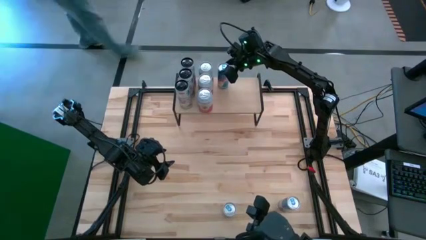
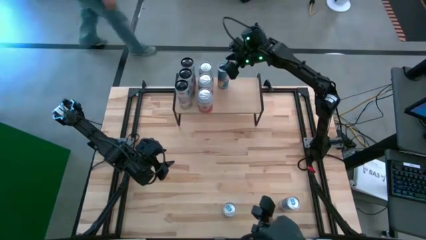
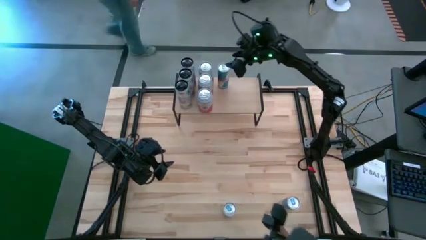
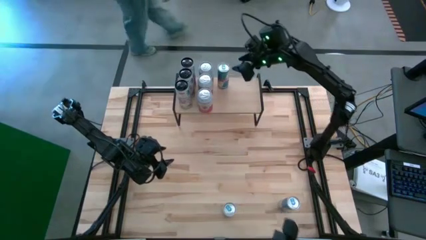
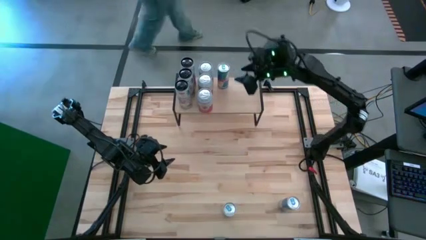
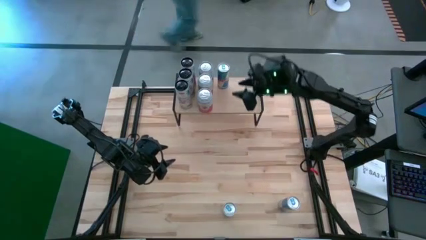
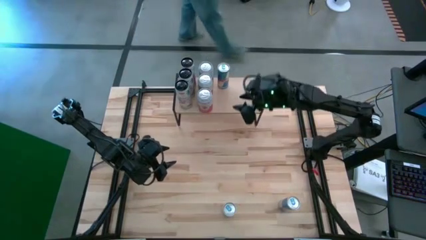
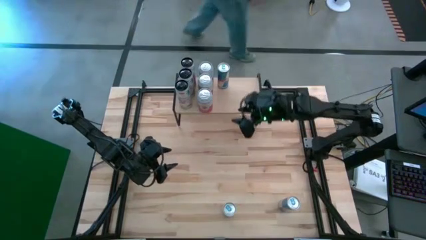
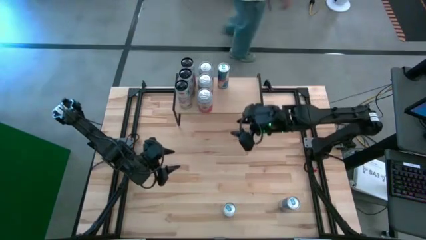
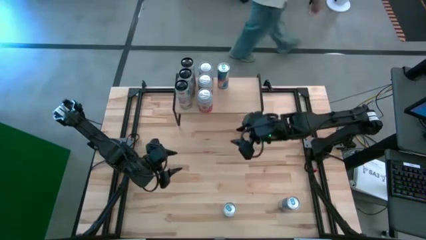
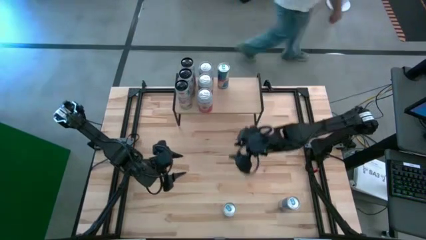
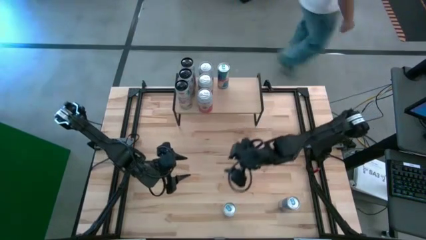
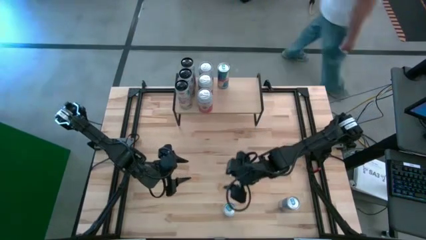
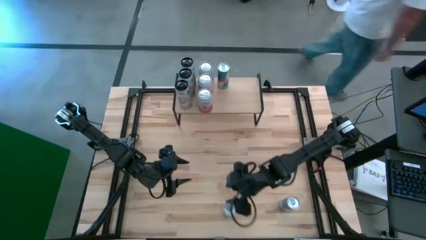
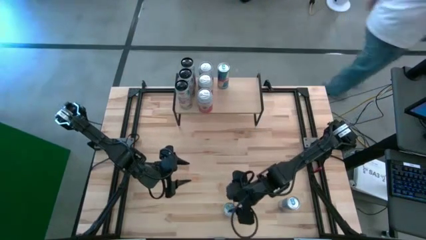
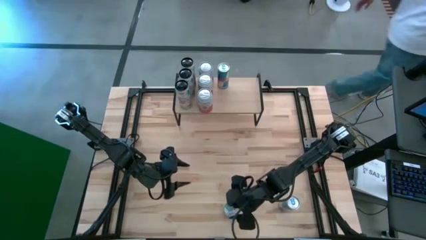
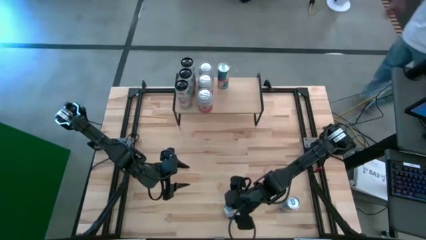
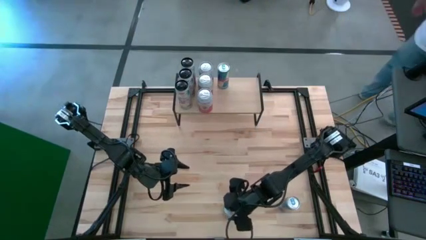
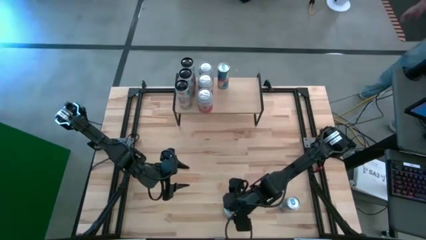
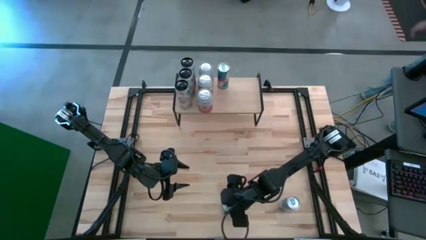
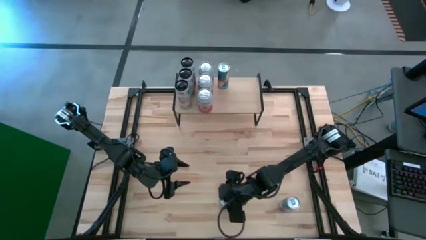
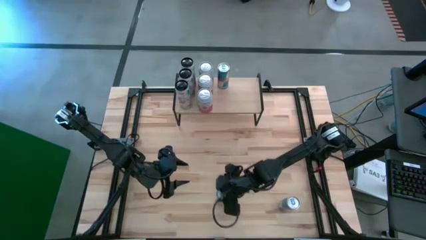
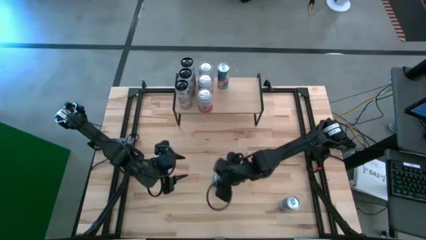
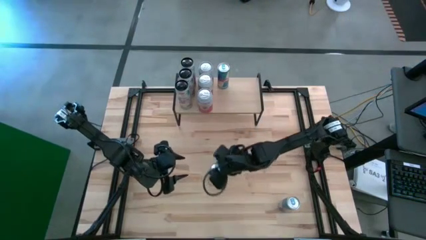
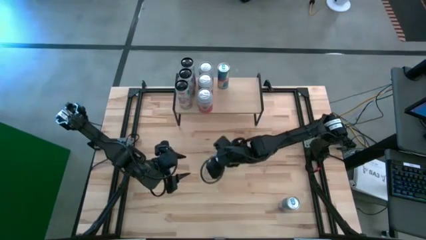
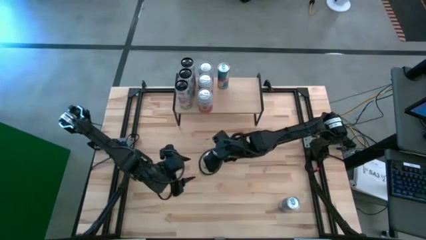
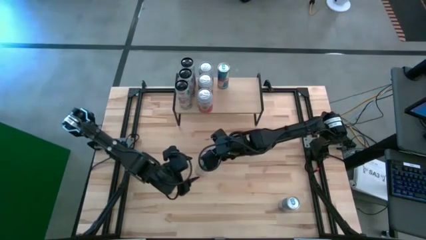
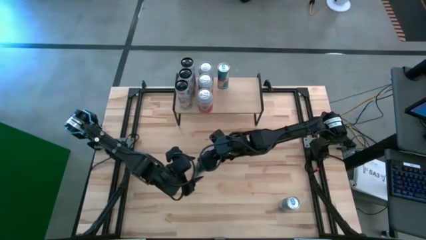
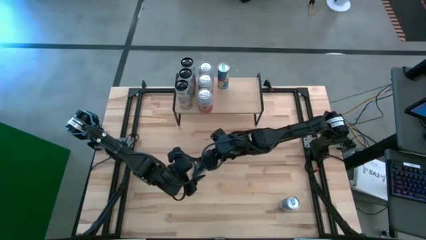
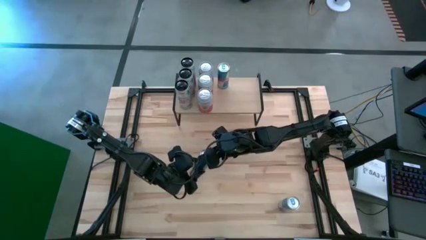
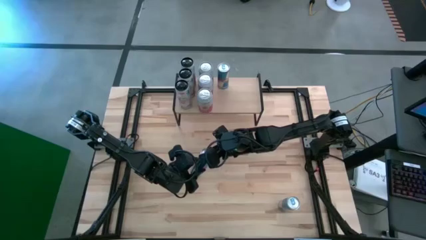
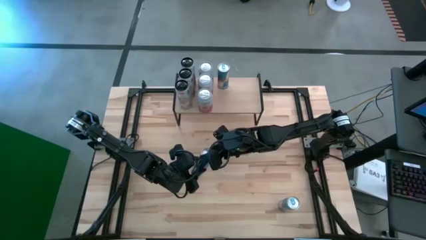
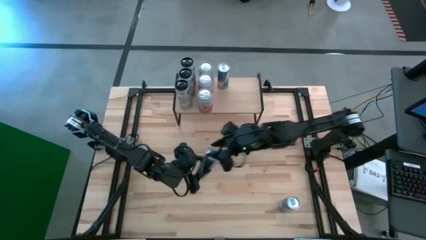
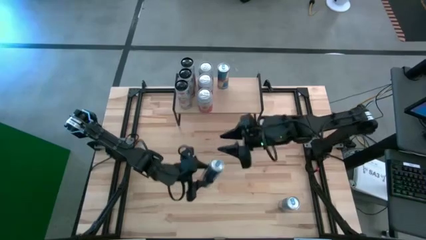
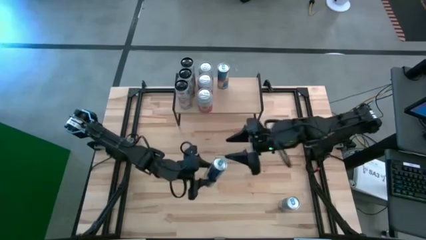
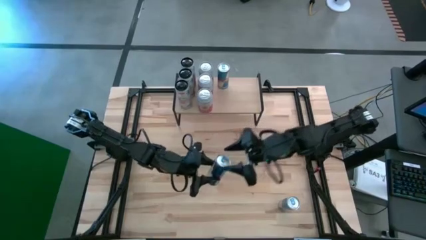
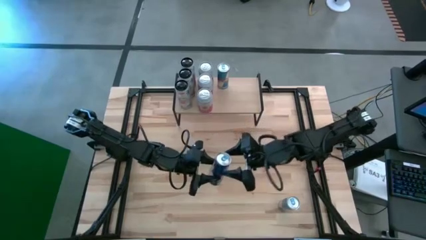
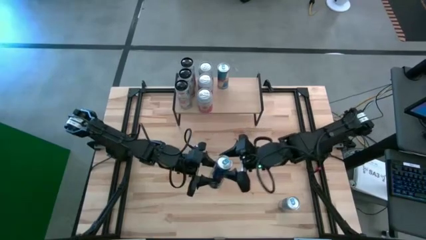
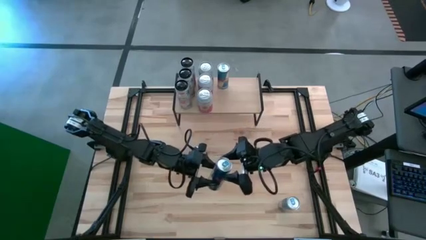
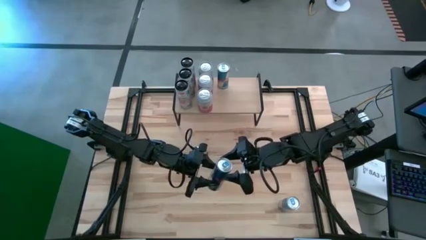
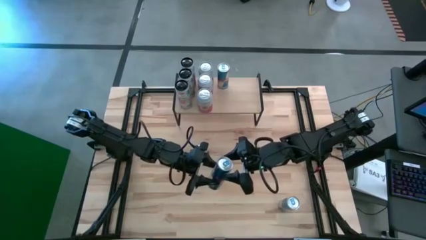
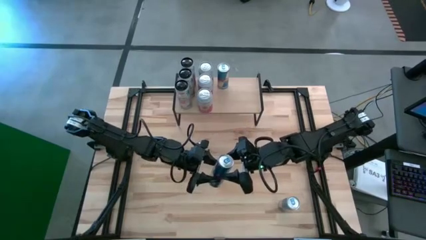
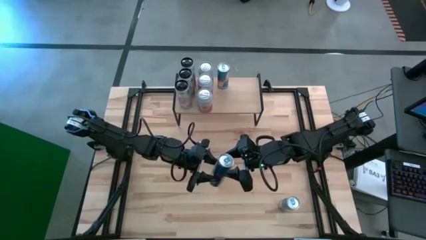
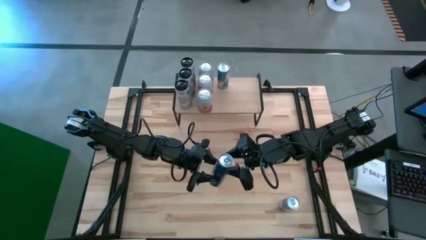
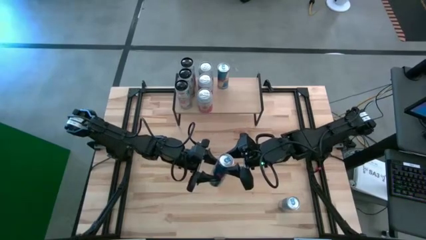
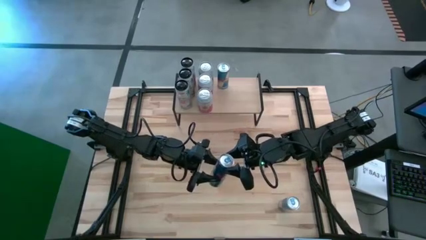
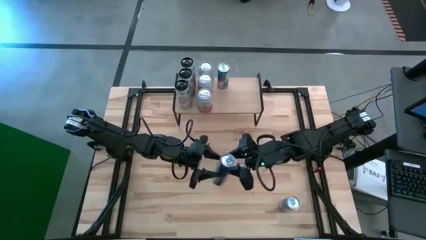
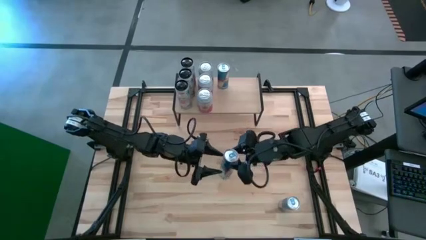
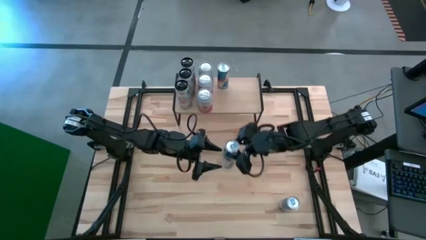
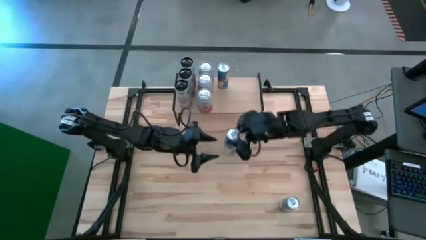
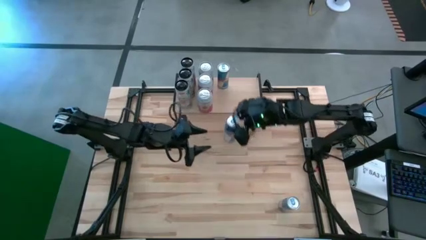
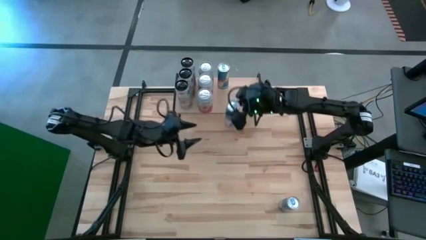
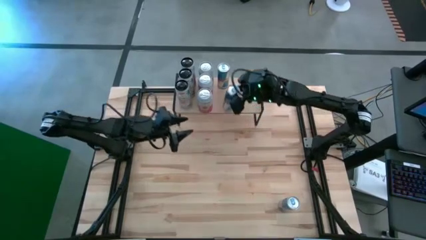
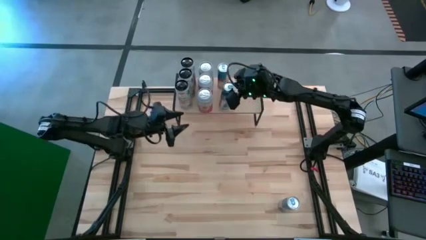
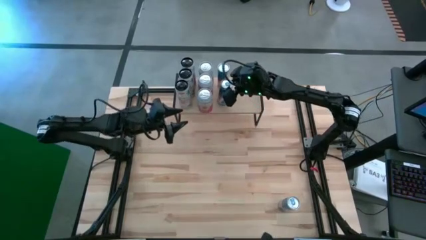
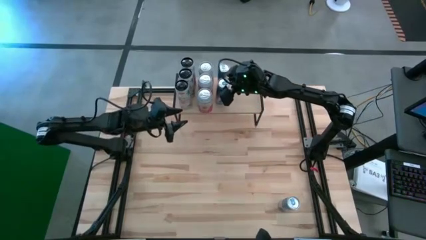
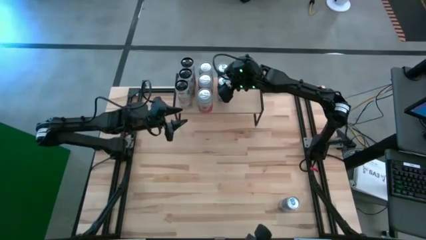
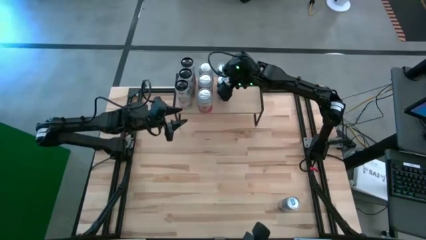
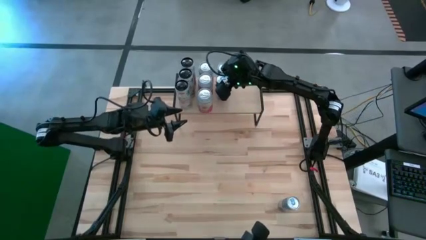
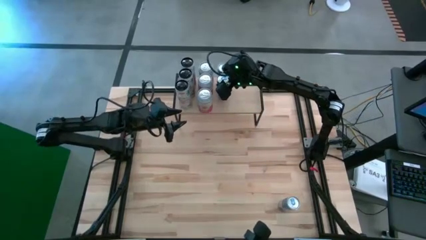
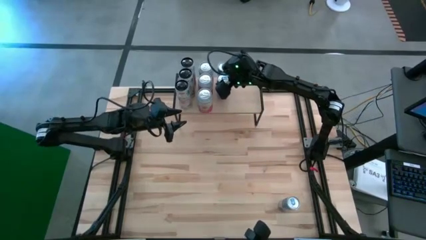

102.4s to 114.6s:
Task: Place canned beverage on shelf
Put the left blue soda can on the shelf aligned with the other blue soda can
